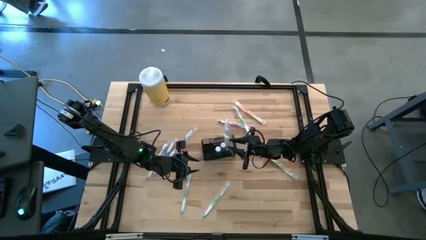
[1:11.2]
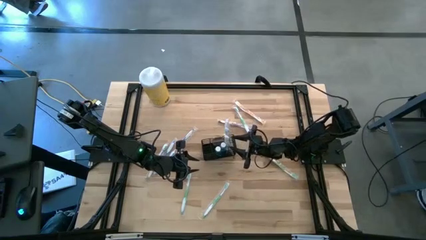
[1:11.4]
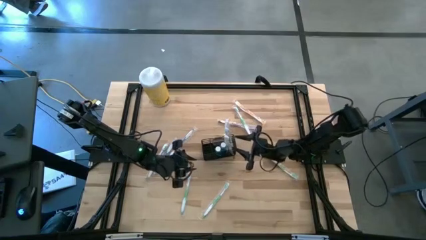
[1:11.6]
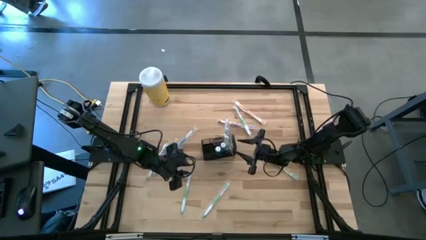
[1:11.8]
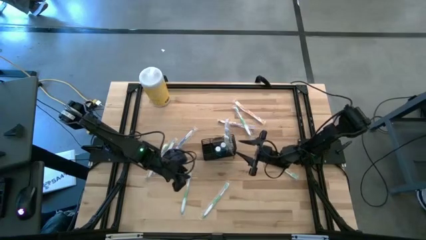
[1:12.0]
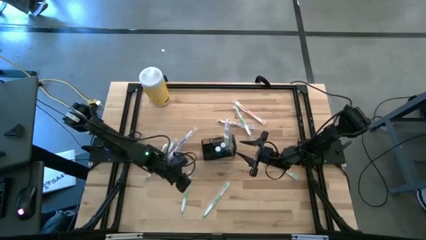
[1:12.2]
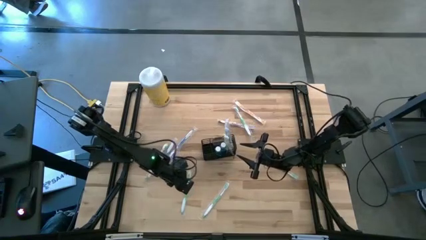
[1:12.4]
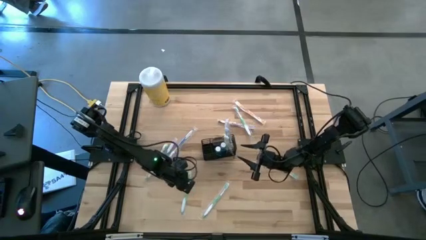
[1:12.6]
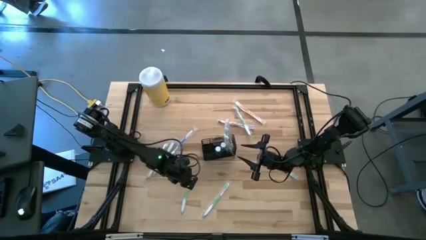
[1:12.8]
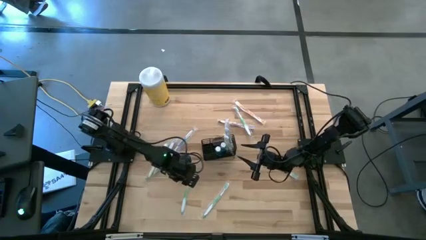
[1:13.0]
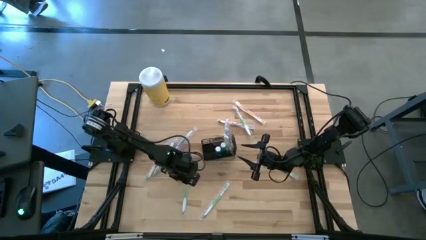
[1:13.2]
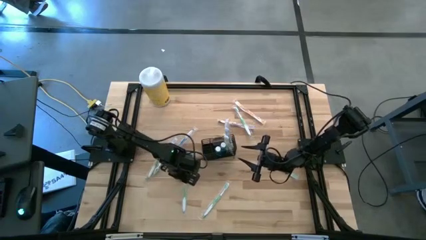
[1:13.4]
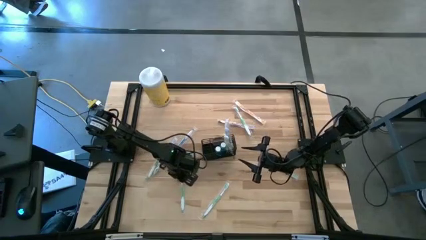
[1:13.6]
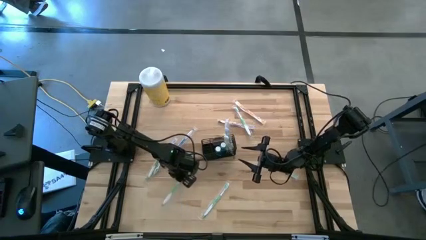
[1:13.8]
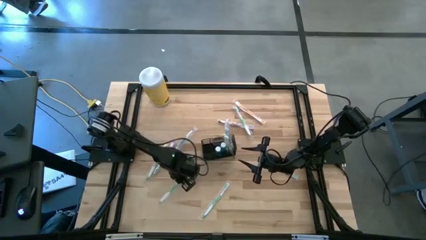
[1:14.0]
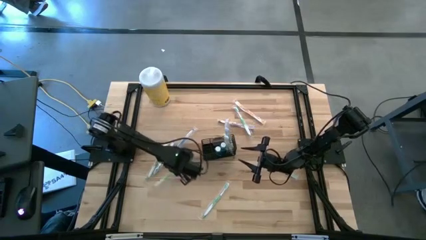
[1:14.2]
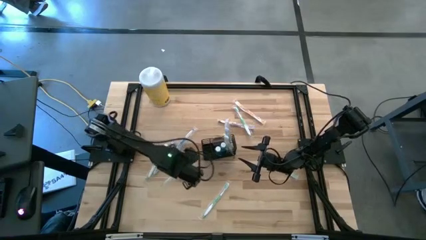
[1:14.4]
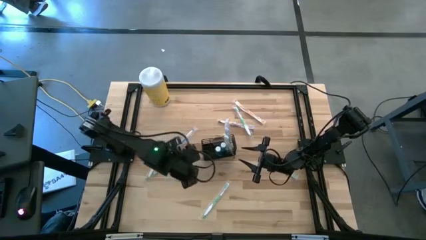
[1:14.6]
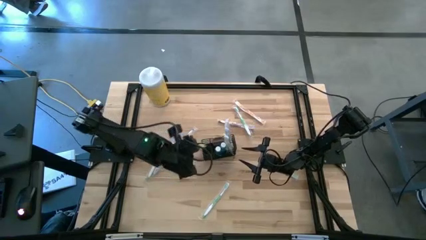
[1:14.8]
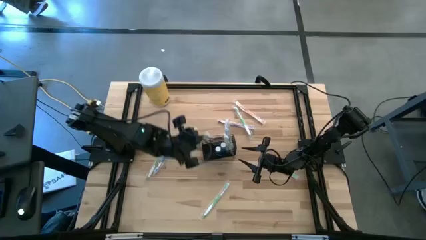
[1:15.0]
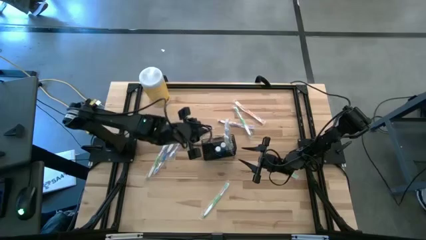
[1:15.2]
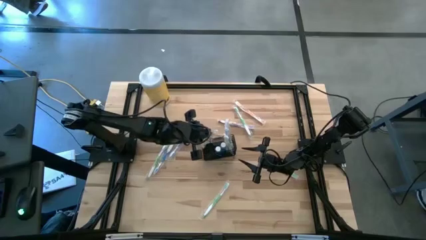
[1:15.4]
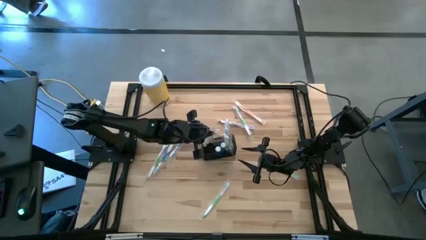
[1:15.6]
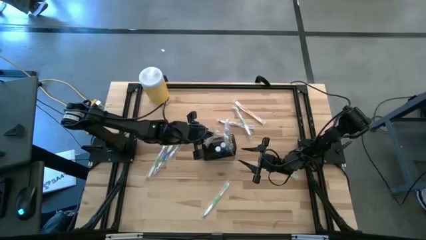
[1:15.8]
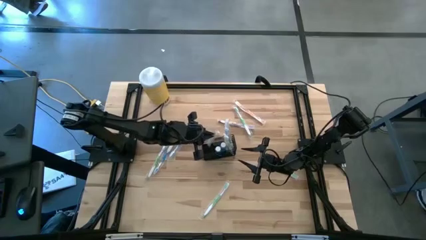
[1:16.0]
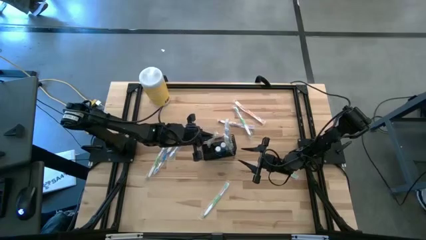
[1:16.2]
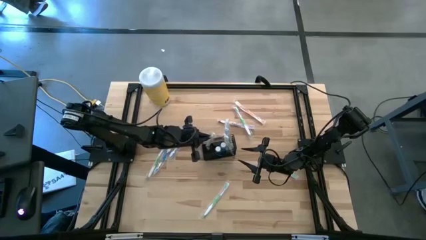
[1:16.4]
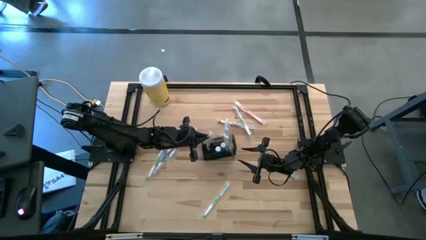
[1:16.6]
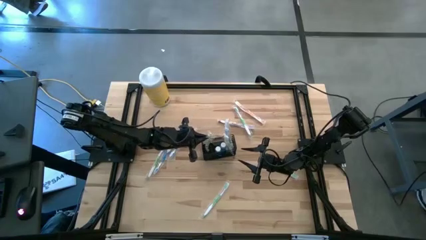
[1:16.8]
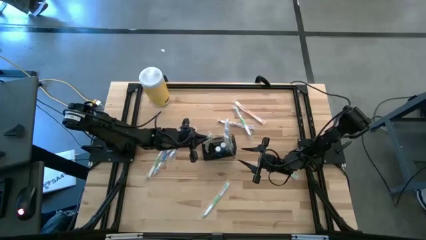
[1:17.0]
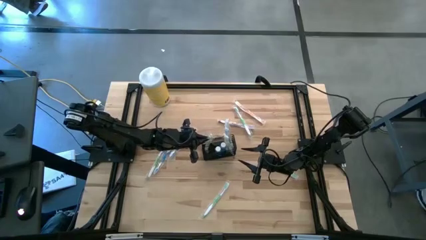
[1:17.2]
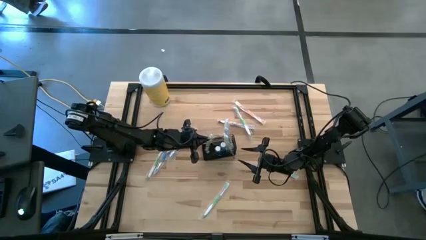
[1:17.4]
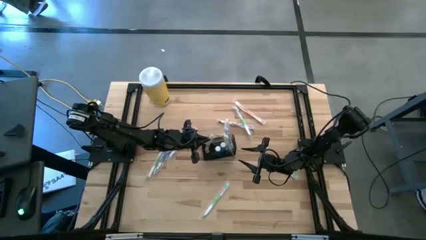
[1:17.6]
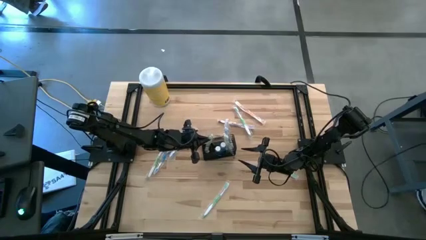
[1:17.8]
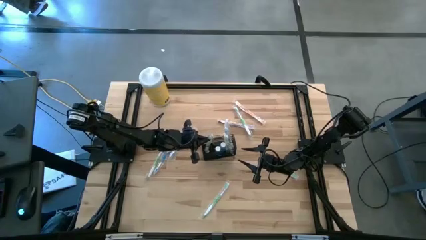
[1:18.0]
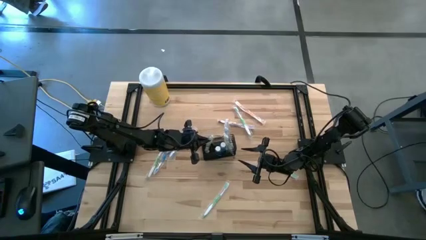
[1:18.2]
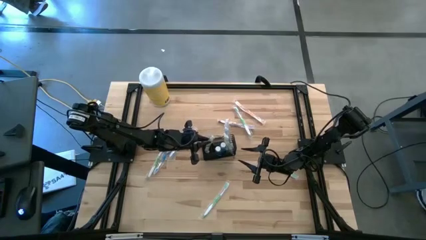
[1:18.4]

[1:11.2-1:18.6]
Task: Pick & Place toothbrushing station
Put the green toothbrush into the wire organizer

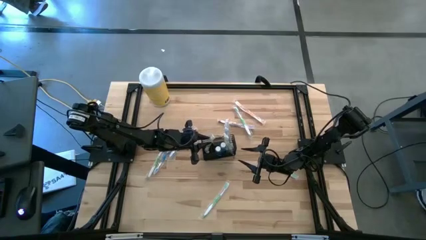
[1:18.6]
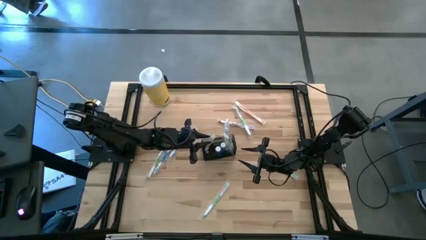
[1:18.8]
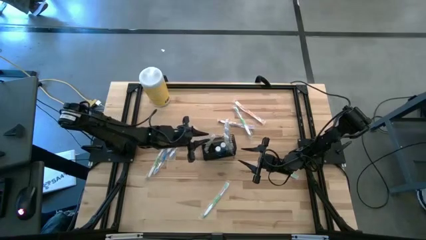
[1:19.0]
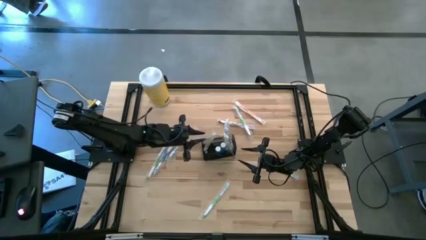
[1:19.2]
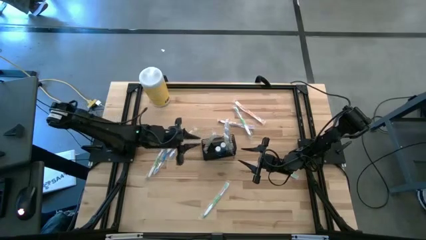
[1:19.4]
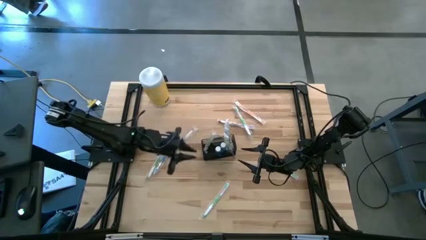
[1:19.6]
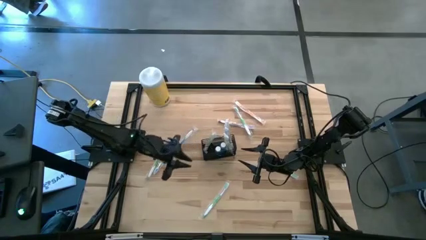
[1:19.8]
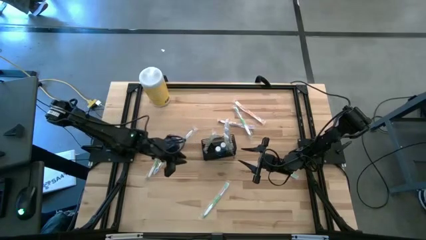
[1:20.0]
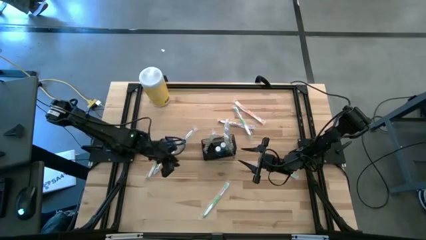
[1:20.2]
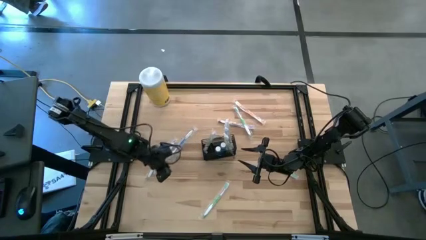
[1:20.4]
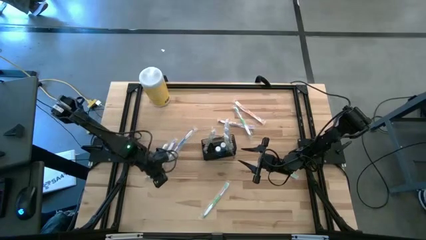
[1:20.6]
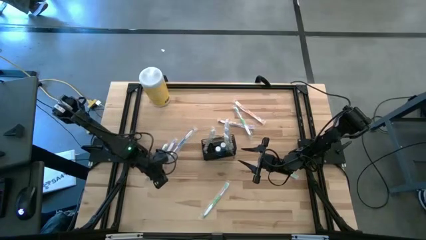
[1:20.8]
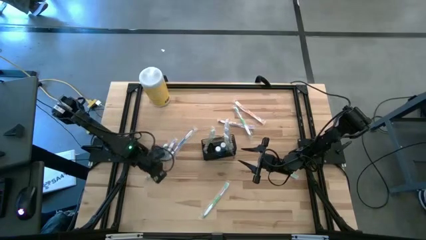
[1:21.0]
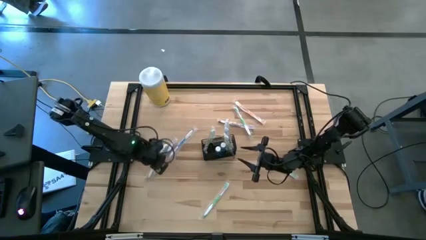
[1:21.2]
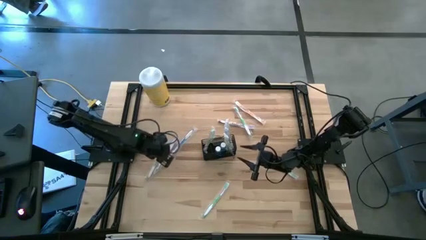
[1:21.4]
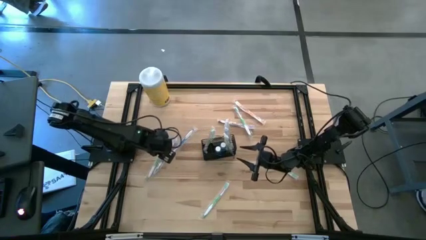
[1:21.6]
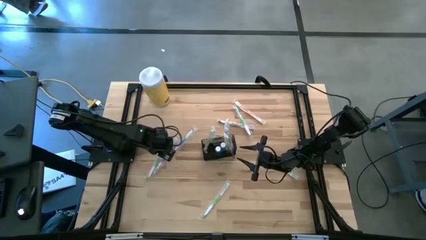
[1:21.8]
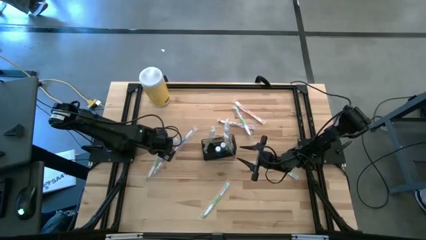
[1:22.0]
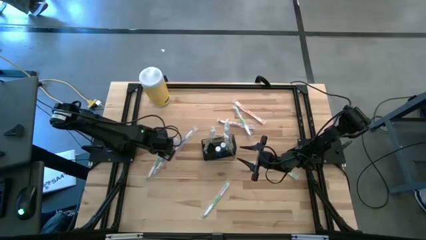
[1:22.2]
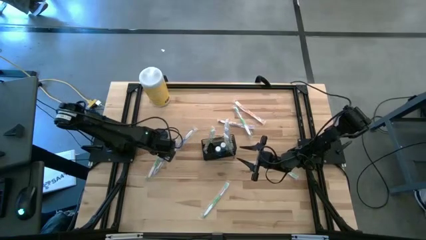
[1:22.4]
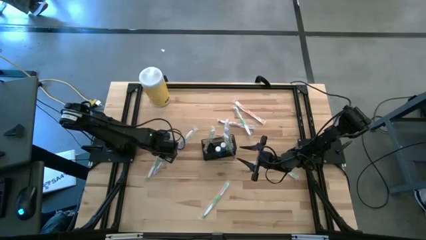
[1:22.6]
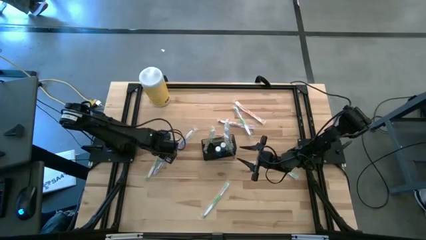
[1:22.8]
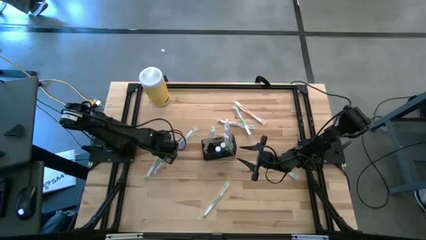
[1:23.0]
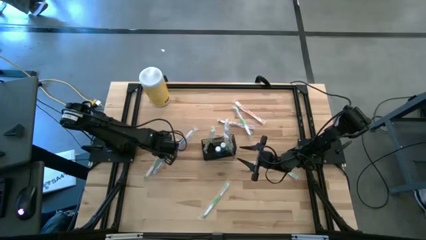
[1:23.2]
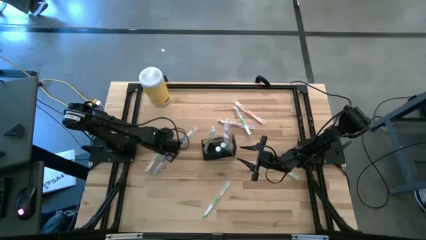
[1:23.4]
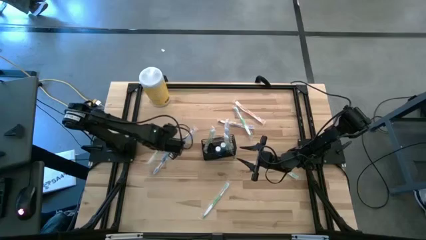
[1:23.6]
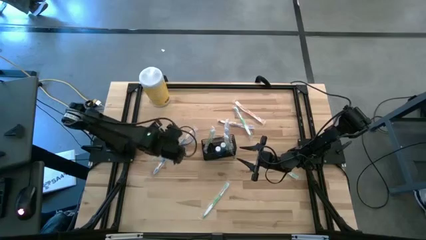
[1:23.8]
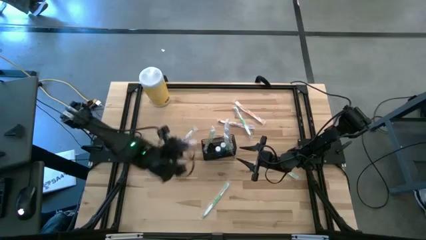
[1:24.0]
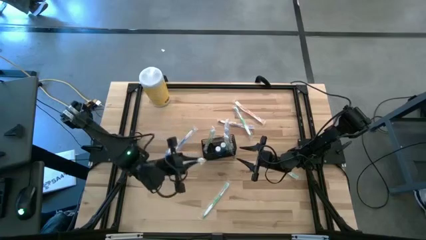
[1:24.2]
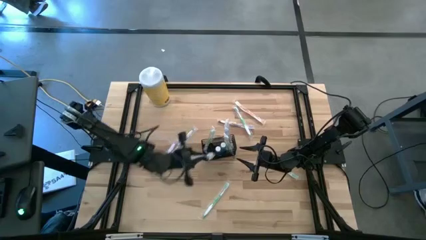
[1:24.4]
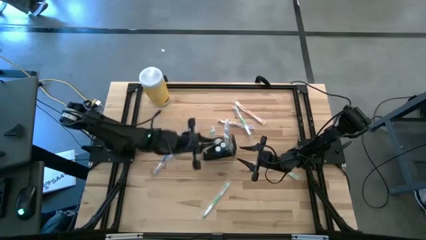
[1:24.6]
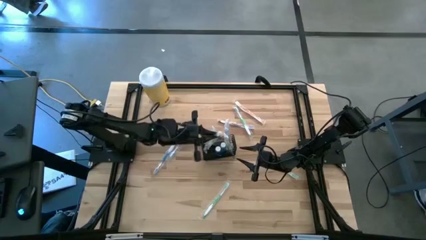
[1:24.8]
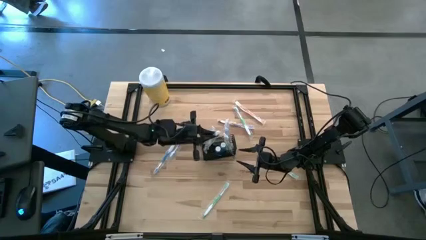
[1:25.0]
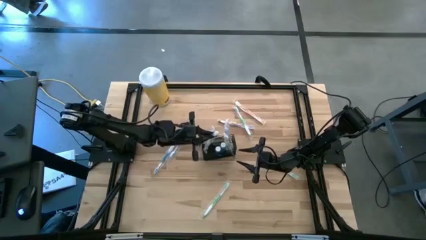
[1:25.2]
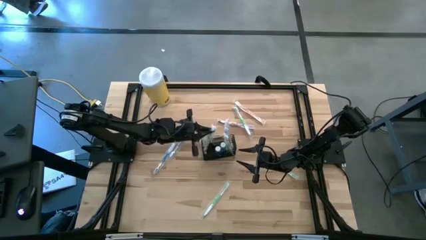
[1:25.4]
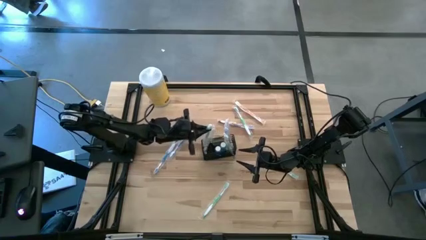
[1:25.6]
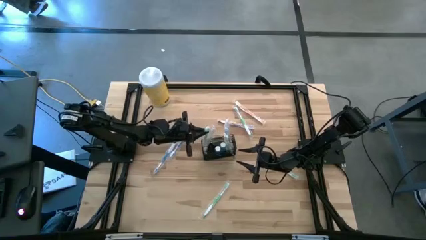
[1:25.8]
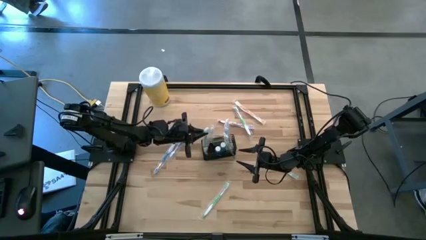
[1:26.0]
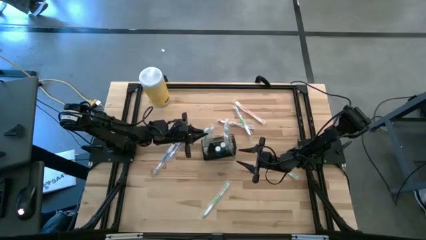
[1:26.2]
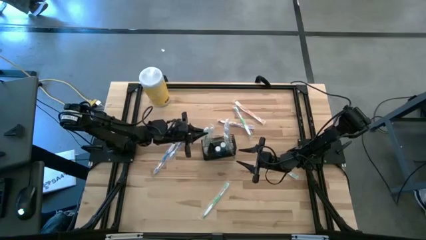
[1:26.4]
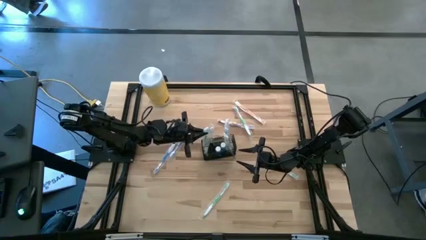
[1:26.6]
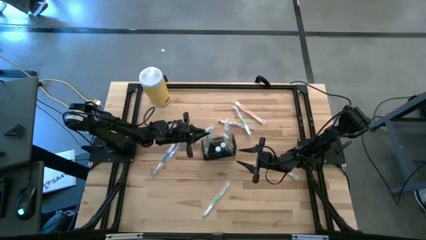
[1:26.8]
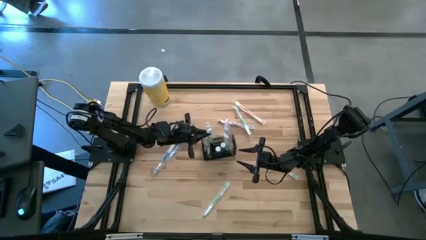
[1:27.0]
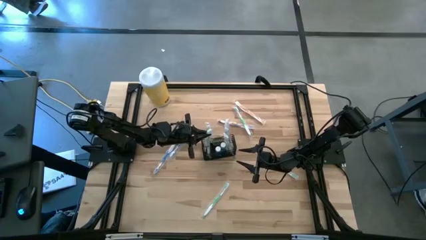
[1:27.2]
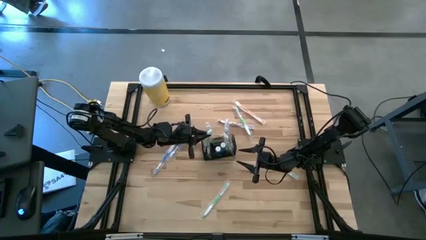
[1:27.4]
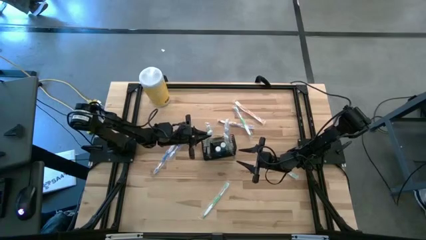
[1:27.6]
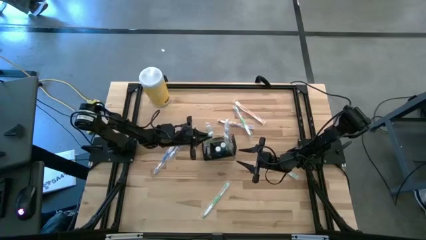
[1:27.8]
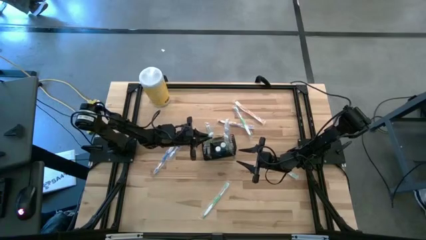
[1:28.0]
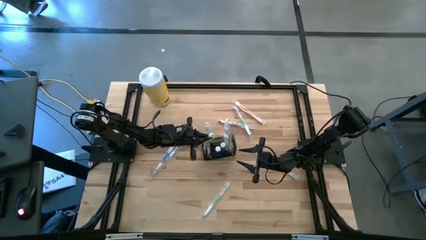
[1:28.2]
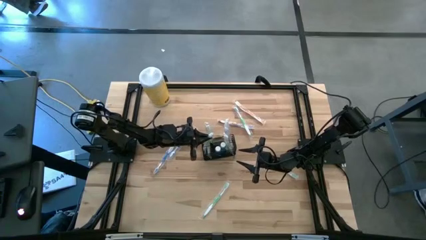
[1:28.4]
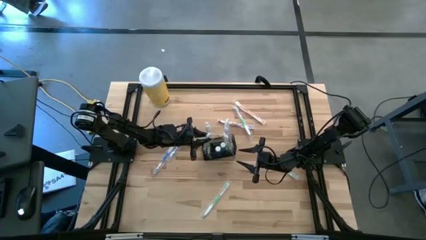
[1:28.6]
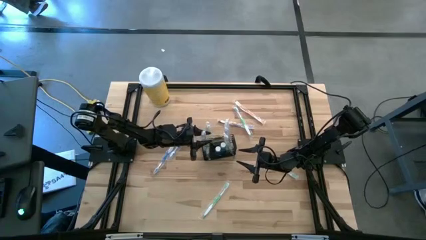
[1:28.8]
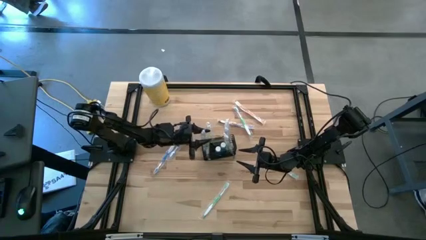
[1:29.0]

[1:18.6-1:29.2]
Put the green toothbrush into the wire organizer
